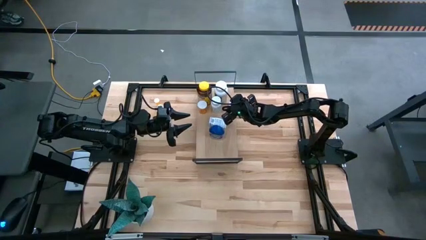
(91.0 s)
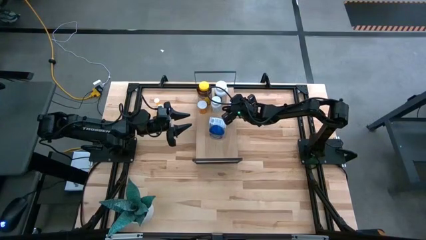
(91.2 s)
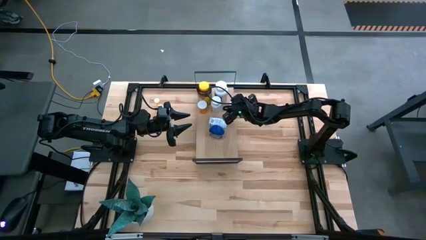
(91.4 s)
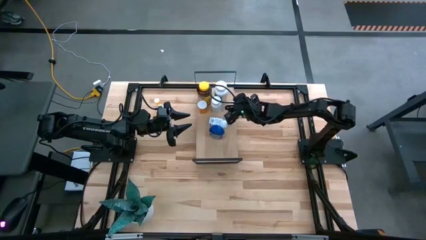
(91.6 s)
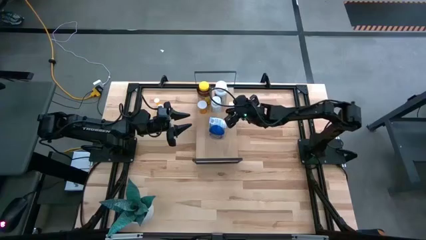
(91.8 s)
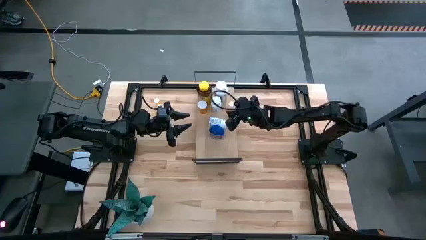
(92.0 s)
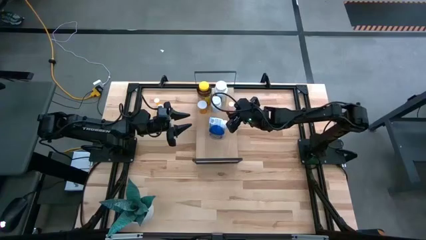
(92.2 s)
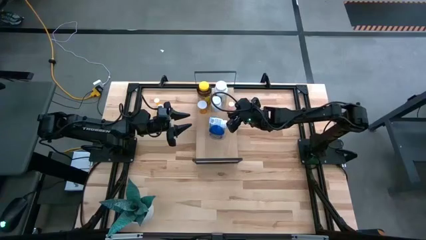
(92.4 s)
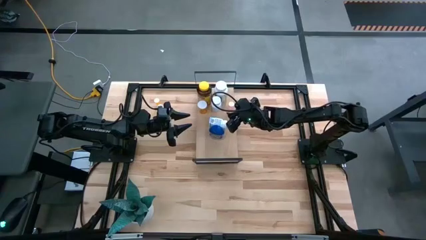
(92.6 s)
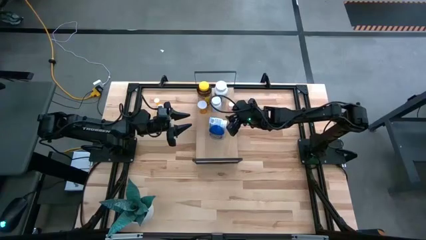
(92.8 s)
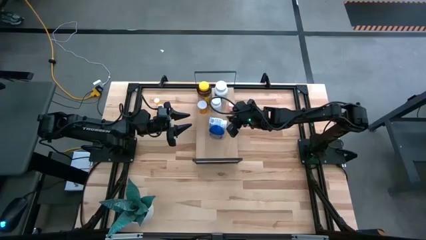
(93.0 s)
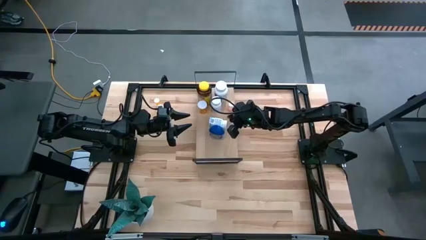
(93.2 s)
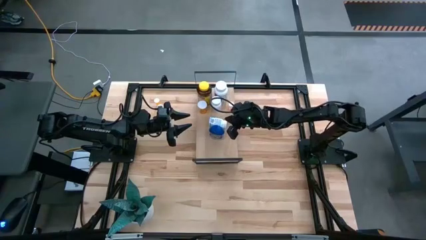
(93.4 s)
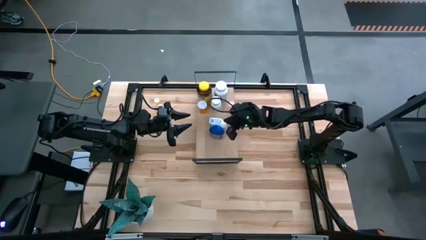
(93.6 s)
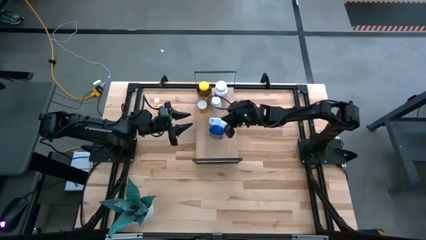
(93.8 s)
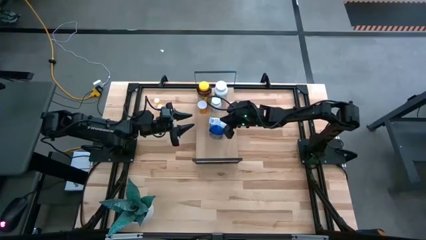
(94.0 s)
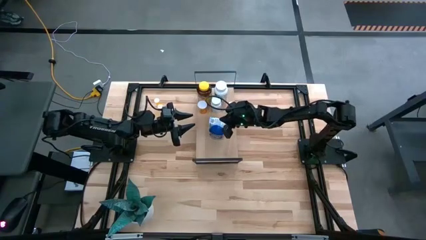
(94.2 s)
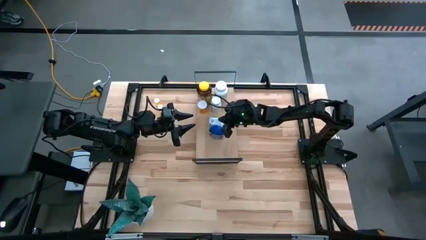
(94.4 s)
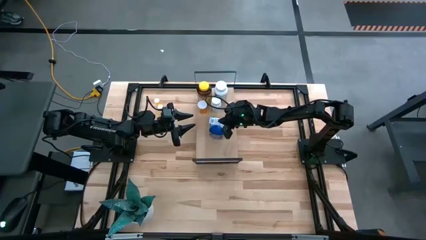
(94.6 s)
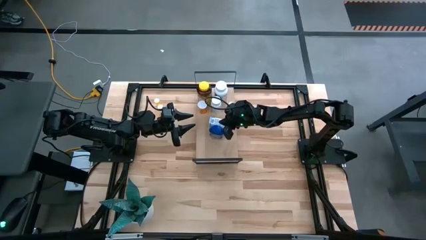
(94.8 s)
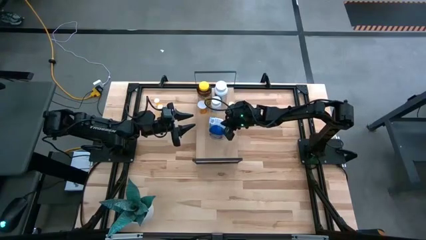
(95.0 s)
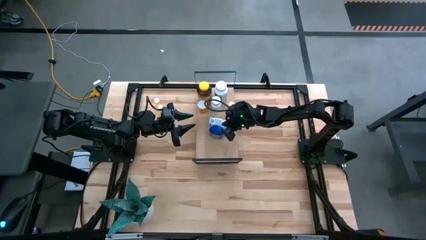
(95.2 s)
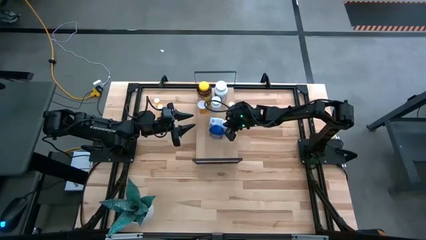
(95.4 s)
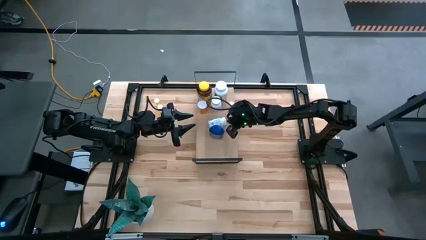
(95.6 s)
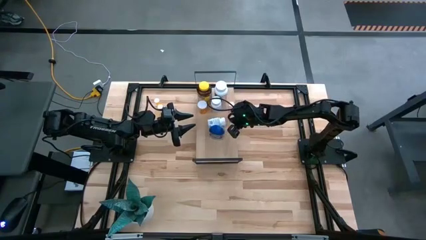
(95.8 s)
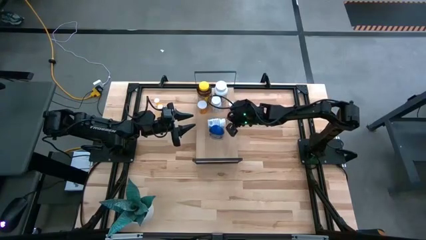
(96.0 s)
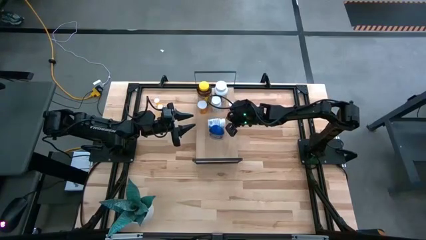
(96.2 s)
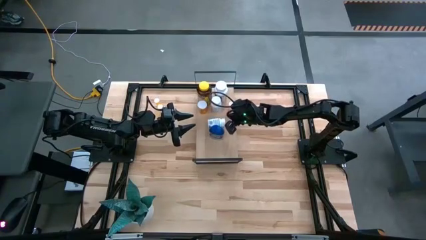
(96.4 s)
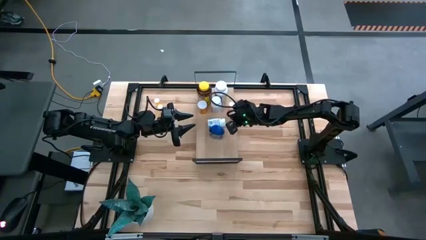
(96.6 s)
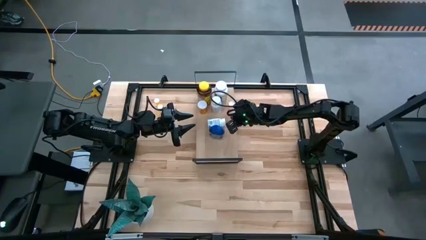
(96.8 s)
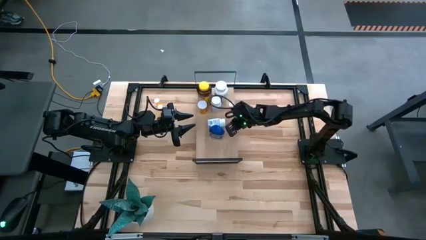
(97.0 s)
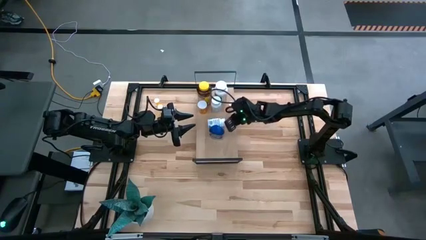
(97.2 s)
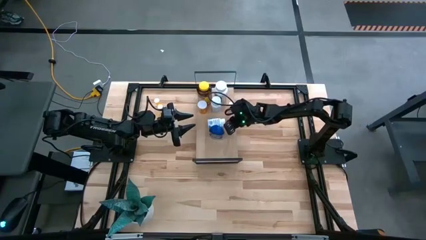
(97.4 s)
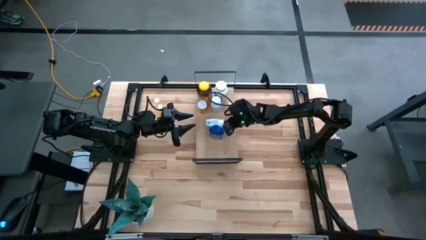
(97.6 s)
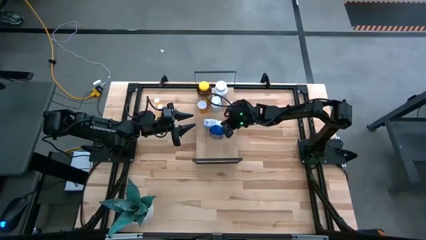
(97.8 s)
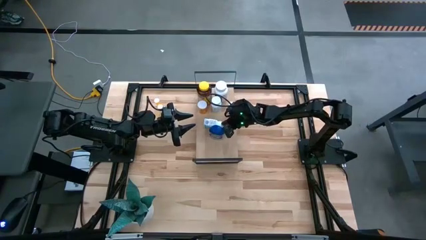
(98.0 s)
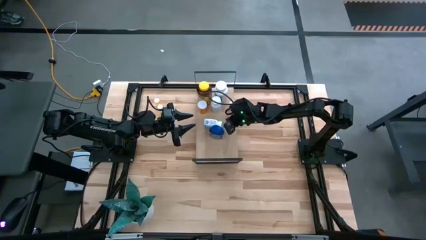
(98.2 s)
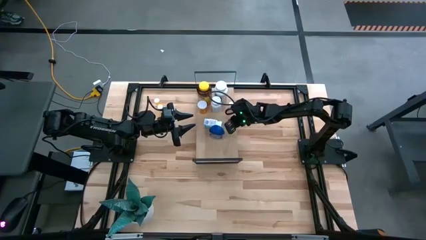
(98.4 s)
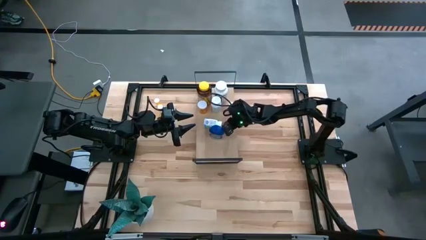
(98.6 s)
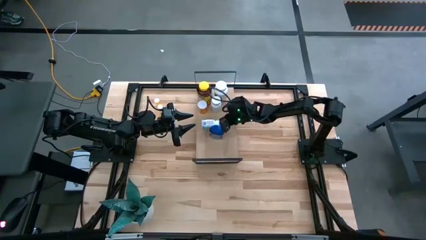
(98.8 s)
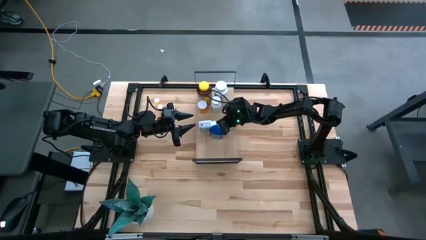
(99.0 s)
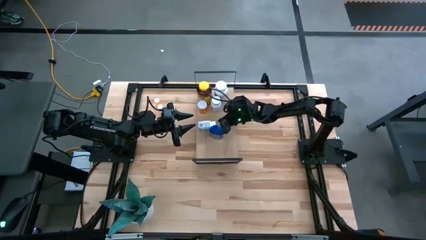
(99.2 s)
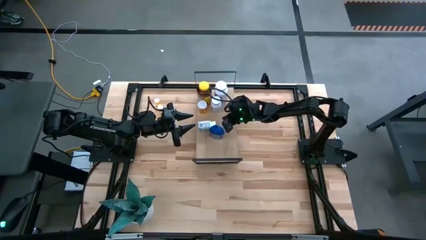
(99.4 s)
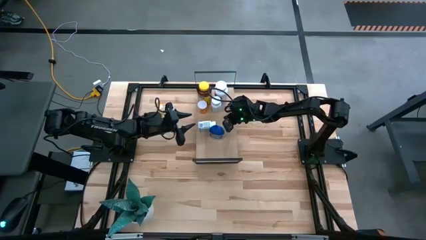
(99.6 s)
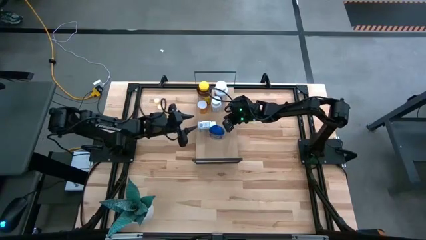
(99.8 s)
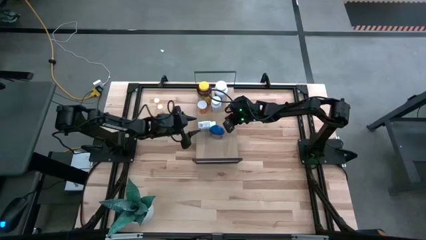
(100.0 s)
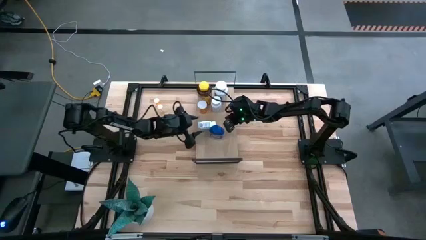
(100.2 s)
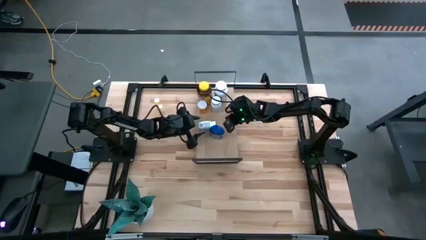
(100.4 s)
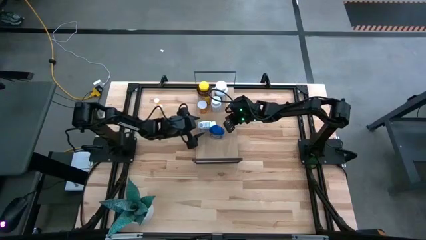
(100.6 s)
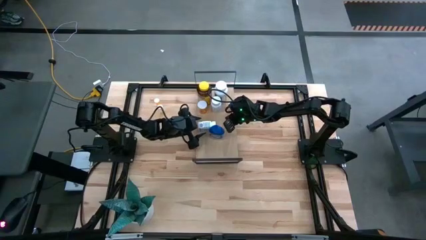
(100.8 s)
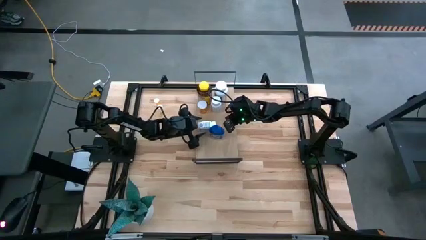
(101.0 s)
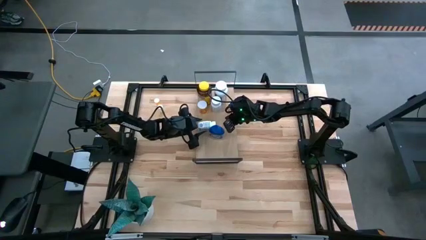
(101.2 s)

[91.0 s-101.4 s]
Task: Pick and place medicine bottles onto shelf by color
Adjust the white and blue medicine bottle on the shelf

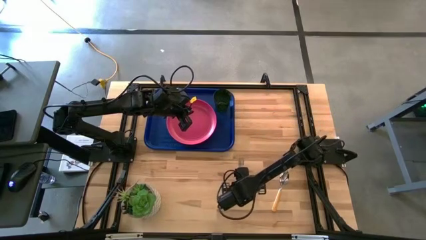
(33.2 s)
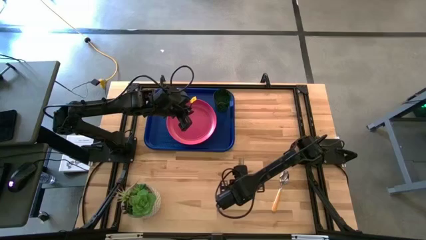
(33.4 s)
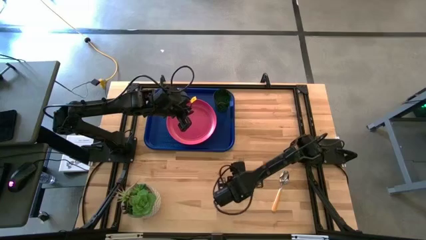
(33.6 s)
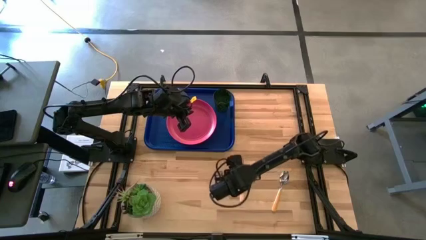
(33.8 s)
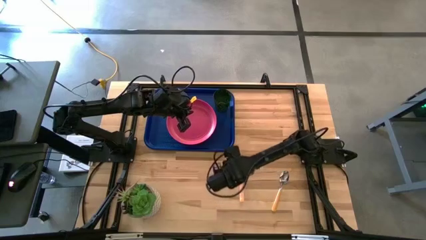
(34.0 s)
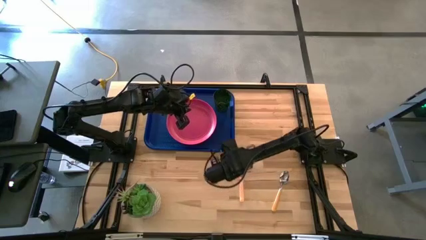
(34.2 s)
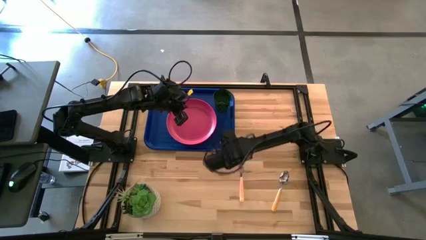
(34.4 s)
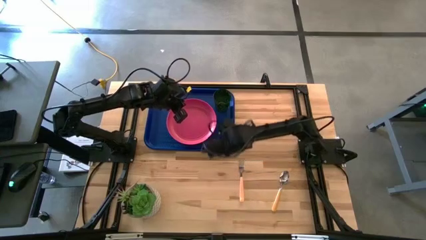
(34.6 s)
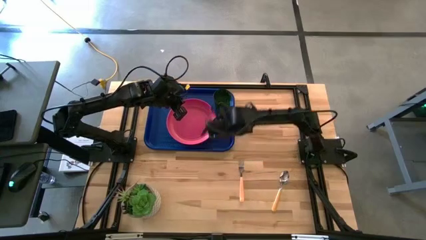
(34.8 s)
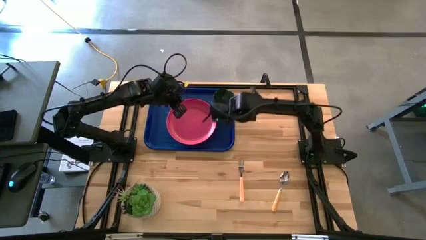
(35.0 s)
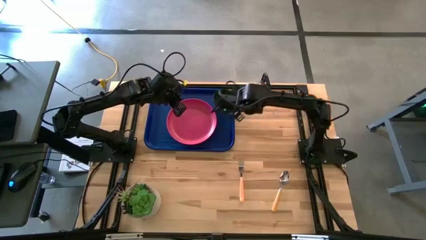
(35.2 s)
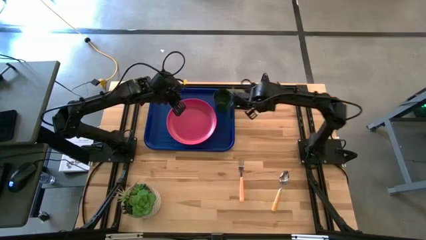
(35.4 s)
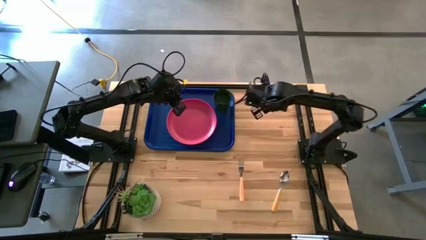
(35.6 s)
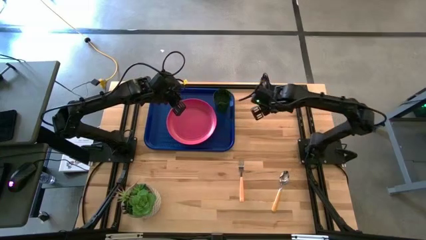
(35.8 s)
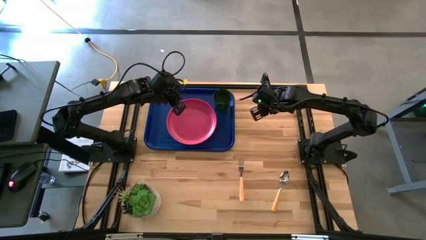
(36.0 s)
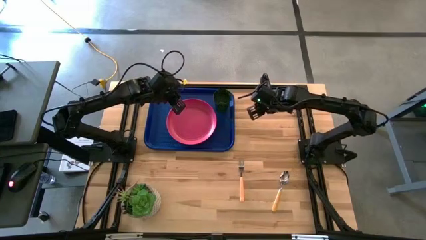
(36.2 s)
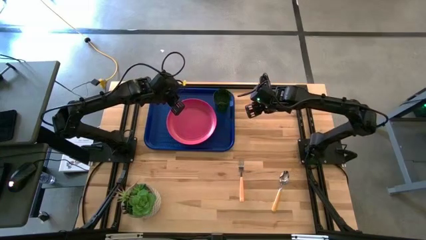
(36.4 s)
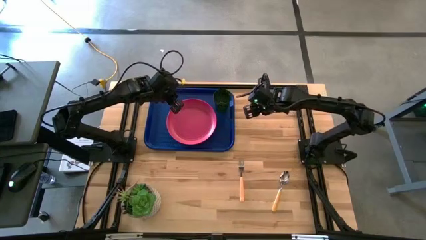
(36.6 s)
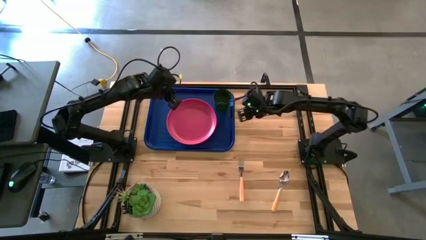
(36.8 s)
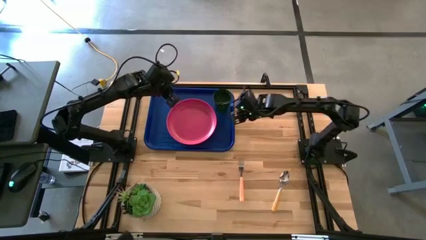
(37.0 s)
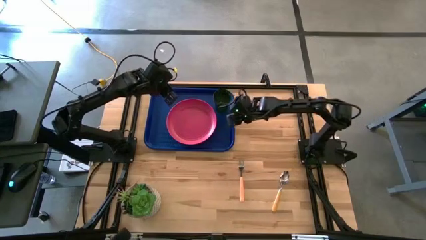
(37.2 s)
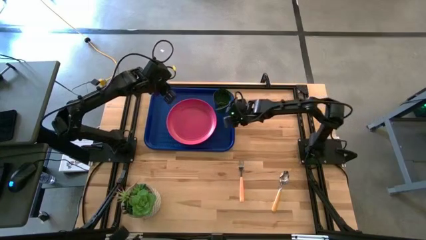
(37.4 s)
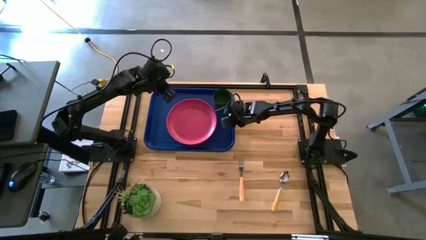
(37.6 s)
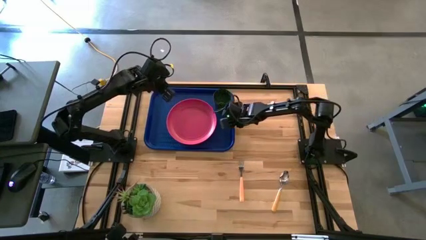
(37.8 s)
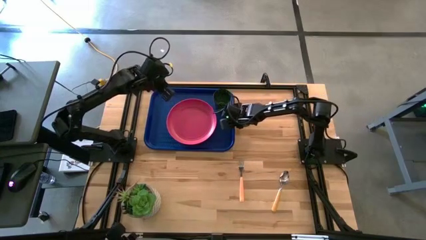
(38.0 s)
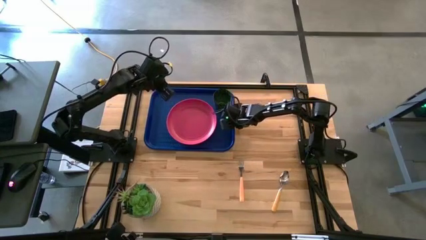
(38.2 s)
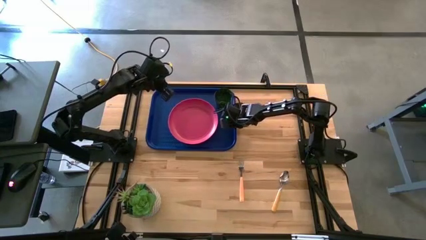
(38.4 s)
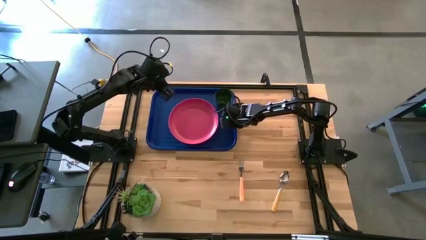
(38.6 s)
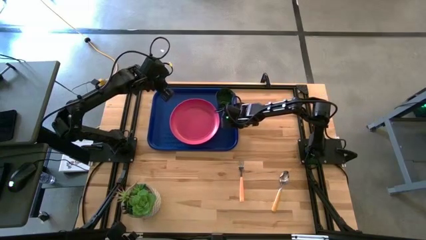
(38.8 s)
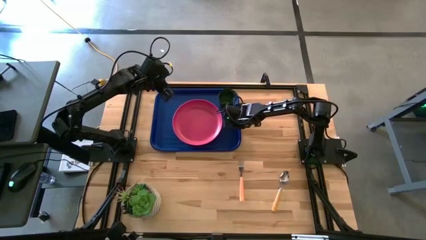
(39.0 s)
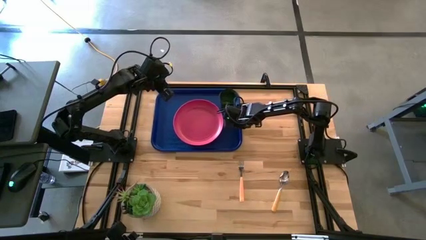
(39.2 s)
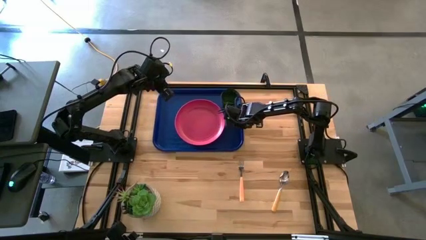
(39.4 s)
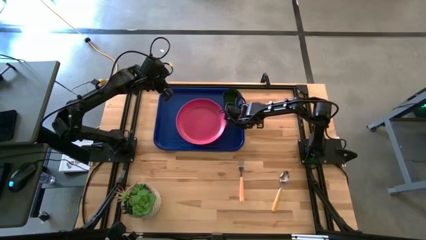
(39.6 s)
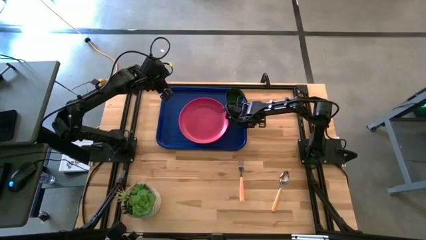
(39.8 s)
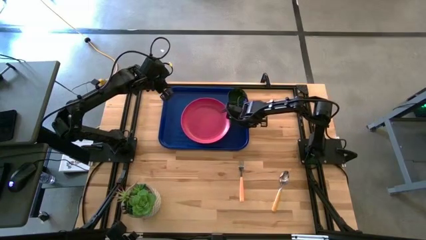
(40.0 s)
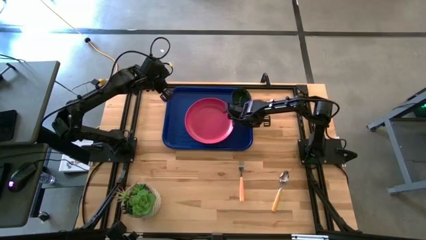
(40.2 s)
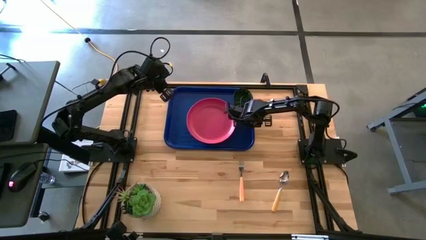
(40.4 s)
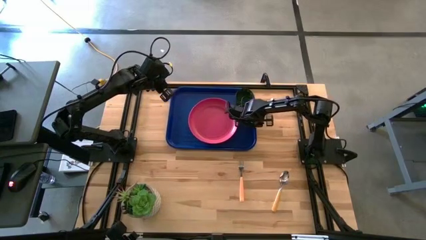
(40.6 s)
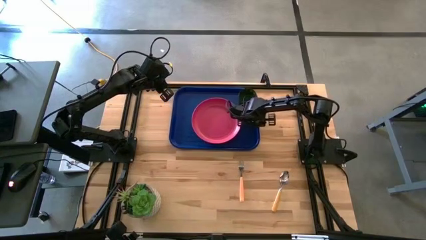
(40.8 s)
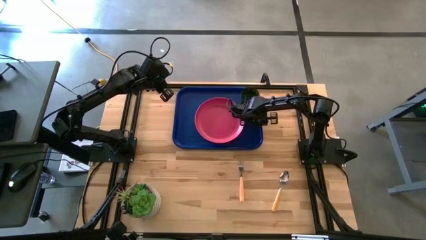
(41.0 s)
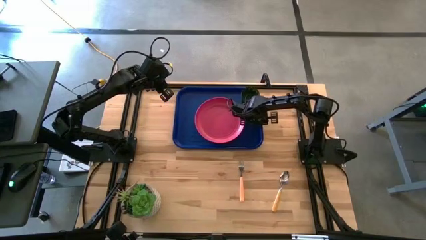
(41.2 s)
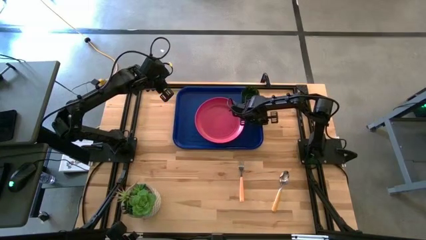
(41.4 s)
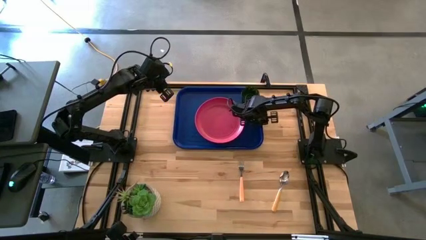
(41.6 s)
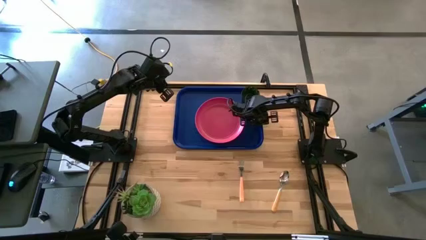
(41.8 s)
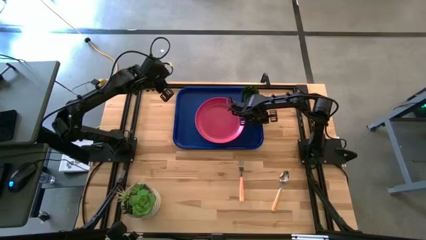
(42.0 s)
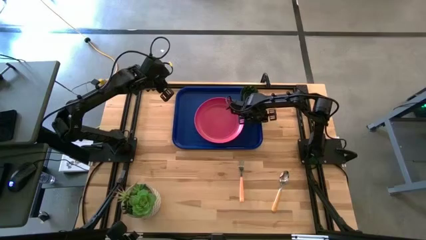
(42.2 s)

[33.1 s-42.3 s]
Task: Pick and place plate/cup/fork/spoon on tray
Move the blue serving tray to the top center of the table
